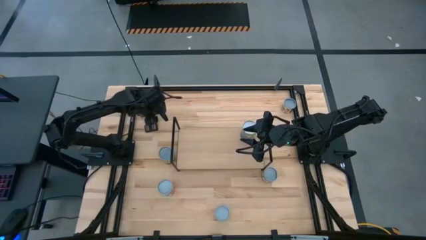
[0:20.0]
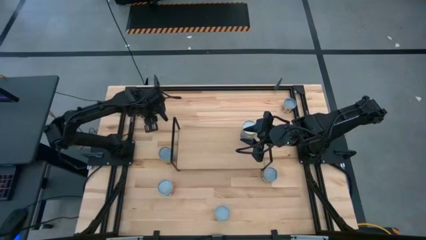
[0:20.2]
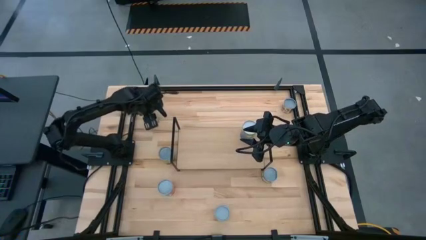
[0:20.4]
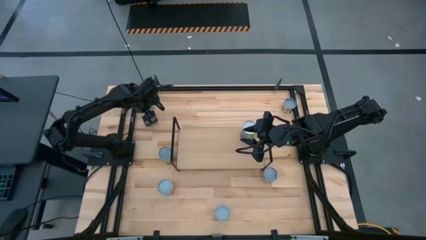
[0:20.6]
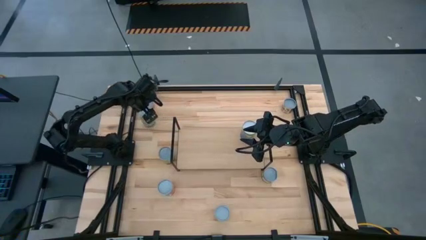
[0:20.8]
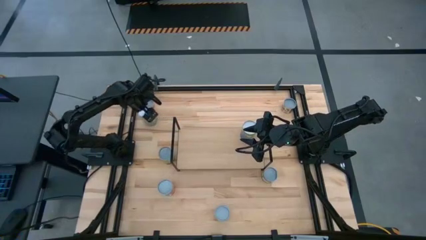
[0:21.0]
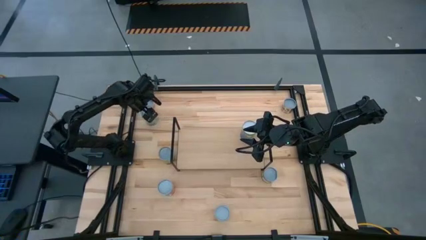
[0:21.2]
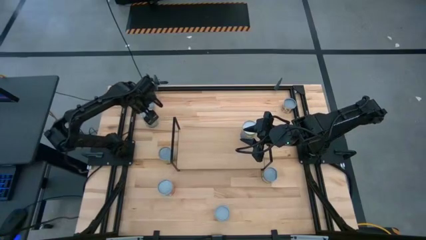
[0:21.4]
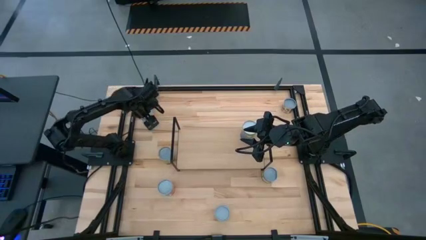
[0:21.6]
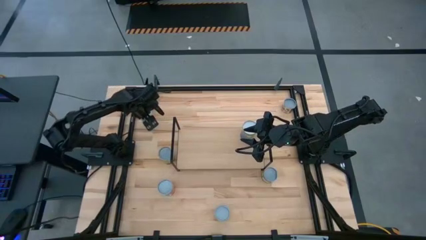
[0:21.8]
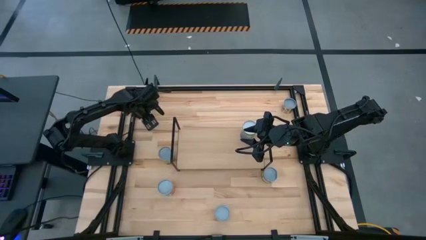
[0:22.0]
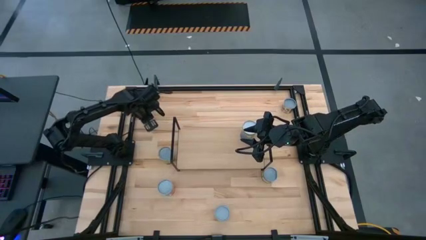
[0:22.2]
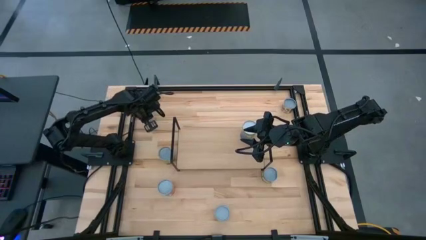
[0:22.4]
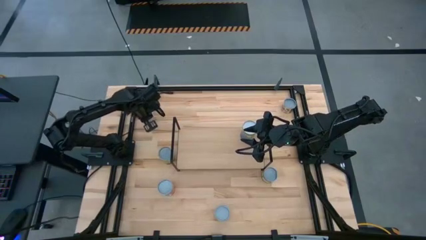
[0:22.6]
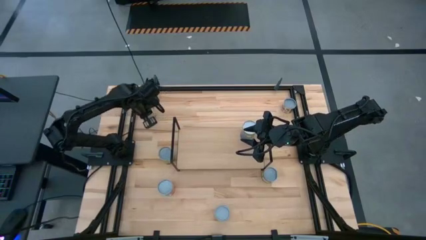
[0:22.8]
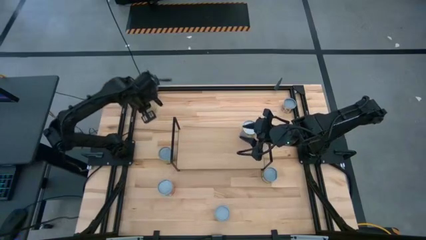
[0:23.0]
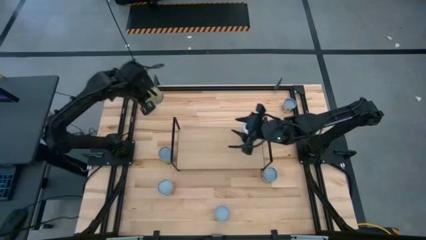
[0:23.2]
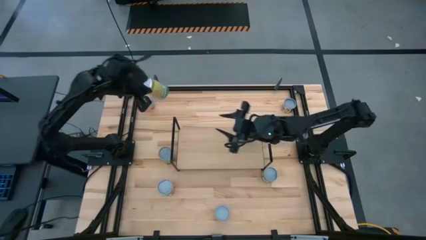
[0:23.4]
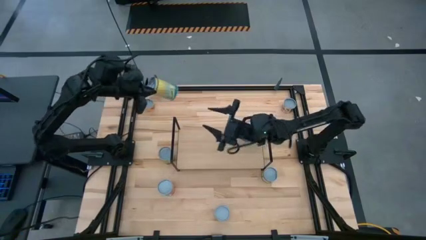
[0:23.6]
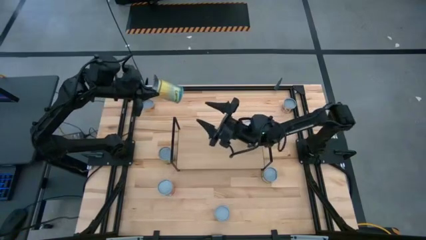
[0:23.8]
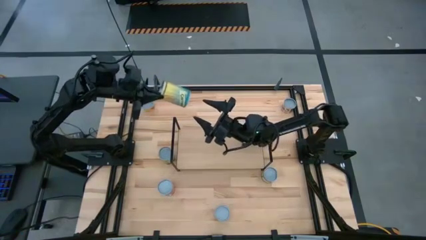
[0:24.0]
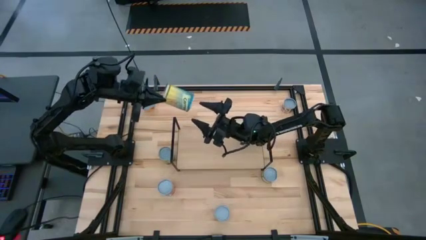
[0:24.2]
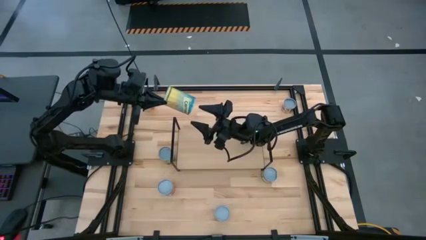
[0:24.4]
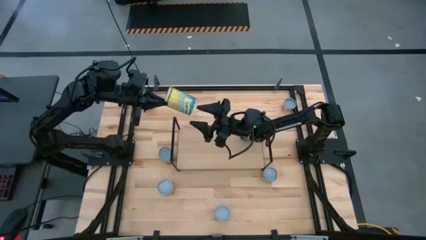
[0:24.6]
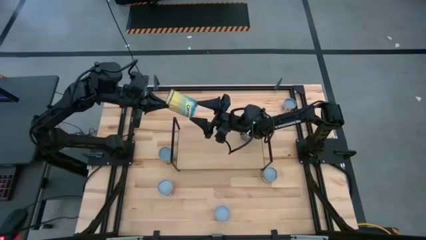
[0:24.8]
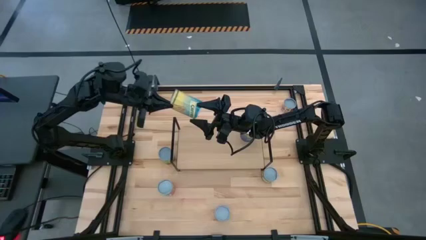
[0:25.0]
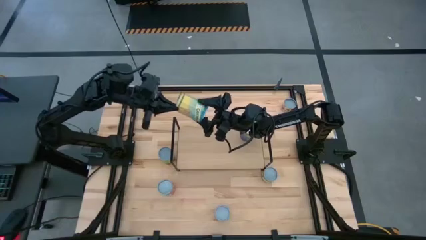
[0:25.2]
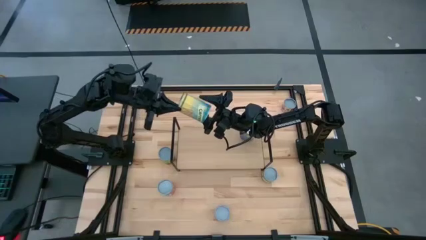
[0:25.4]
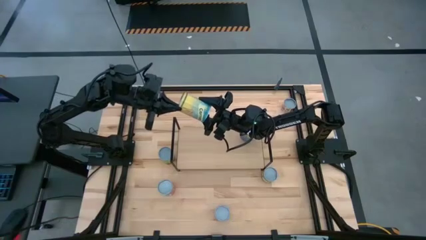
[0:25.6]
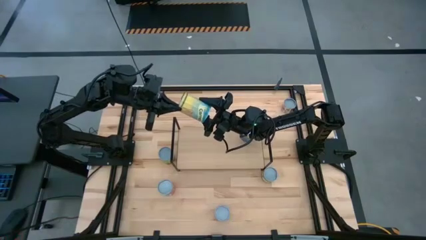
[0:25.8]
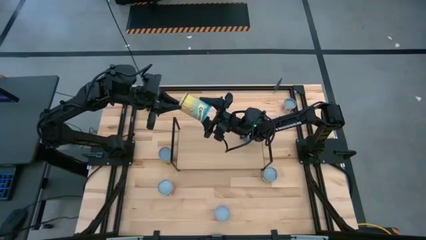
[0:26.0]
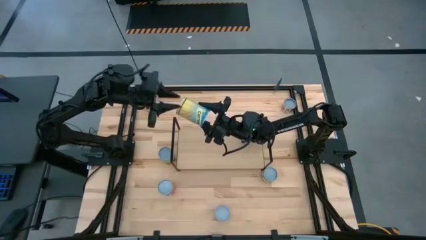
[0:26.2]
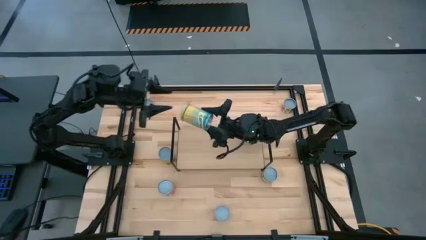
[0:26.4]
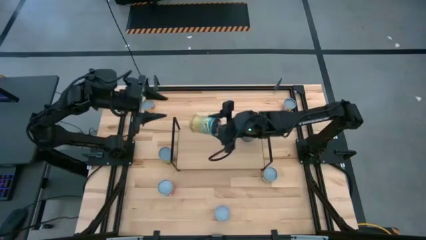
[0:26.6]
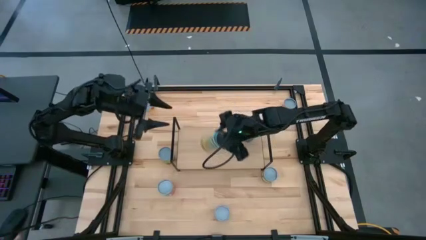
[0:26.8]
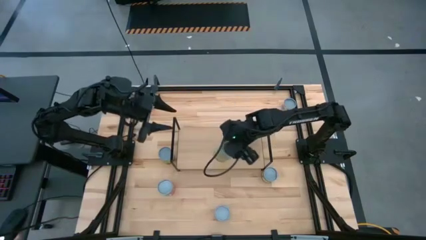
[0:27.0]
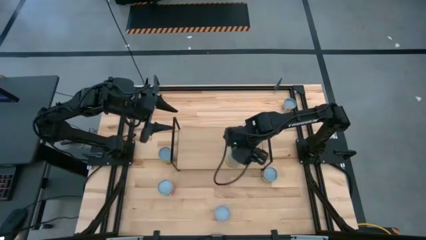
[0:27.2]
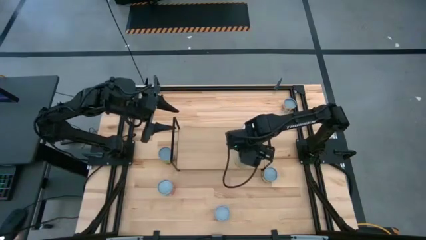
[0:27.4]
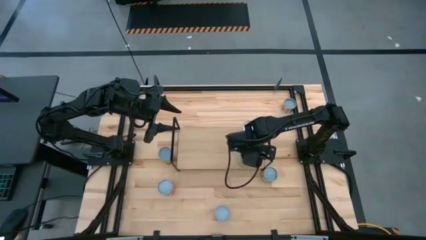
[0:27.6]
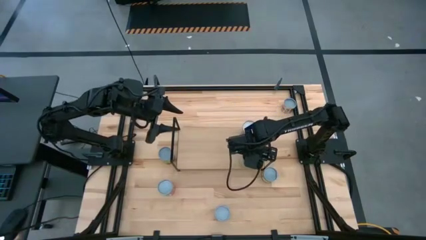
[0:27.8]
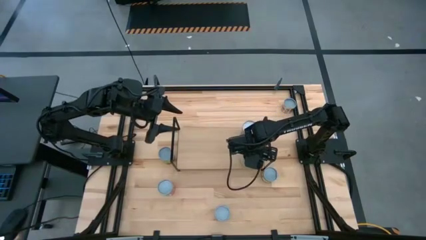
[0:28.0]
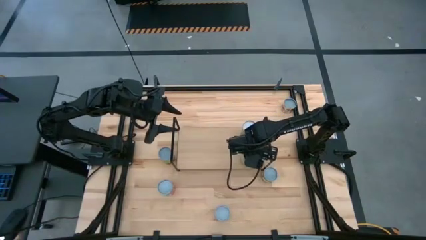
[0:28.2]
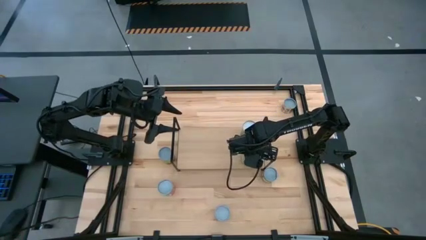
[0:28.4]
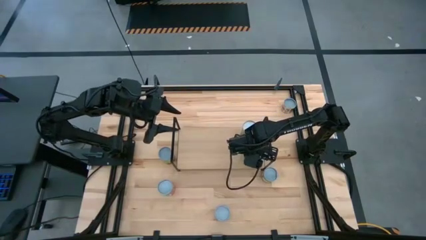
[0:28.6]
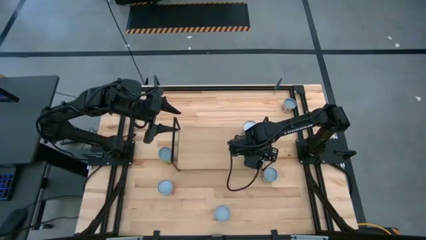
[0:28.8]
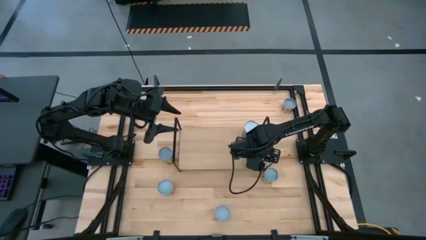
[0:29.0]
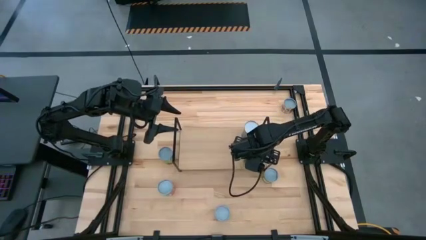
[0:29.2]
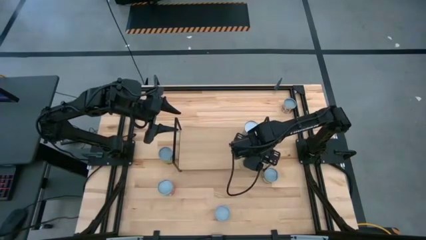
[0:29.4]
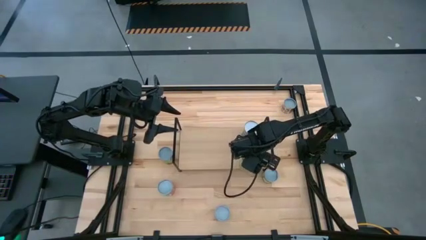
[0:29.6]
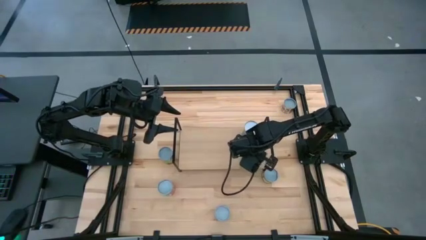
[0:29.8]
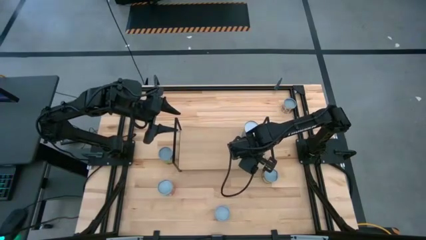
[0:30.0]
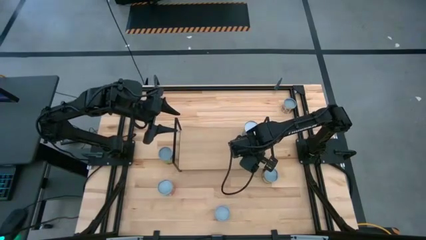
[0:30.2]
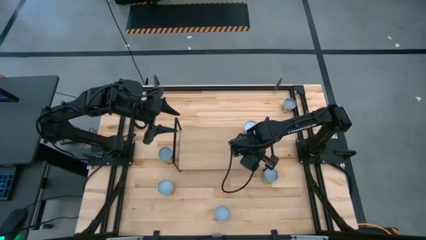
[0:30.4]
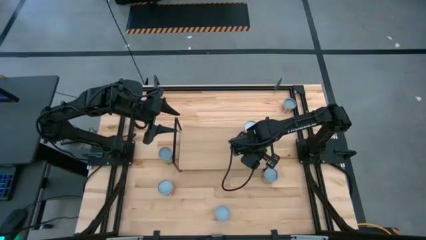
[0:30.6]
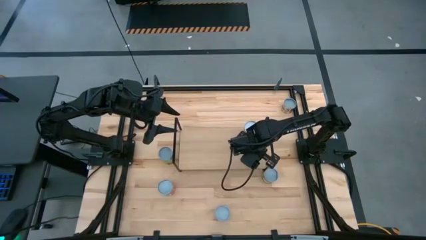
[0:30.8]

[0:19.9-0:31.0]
Task: Pick and place cans onto a shelf
Put the canned carrots on the shelf

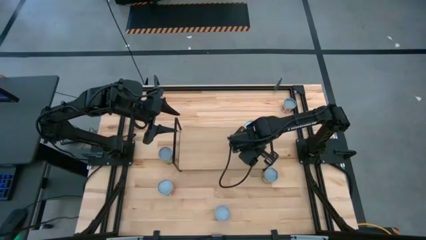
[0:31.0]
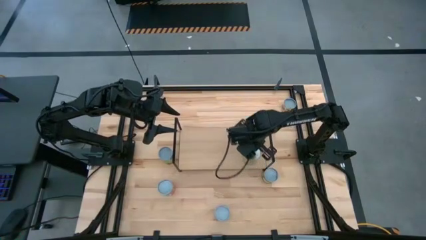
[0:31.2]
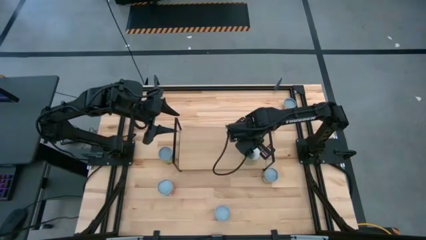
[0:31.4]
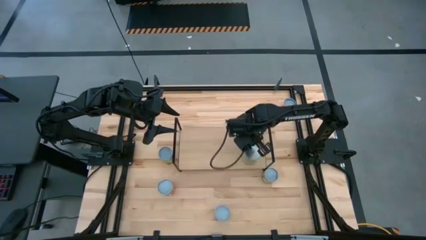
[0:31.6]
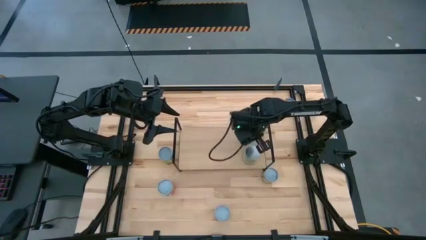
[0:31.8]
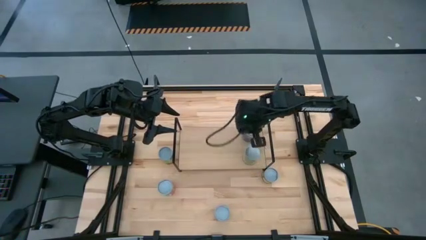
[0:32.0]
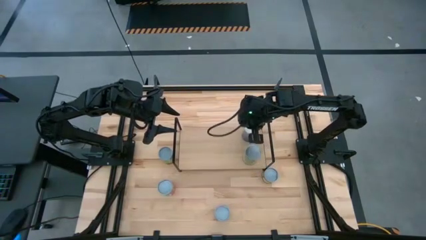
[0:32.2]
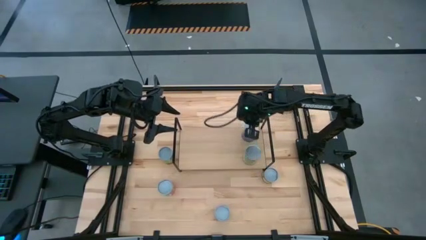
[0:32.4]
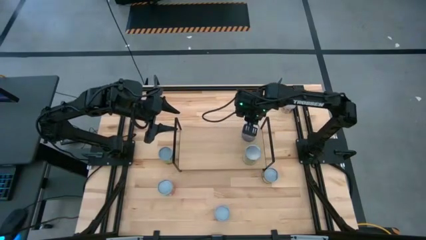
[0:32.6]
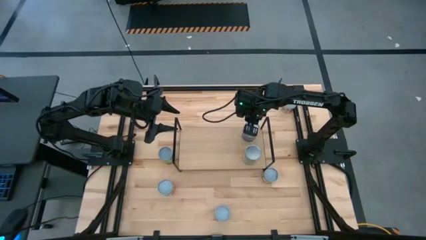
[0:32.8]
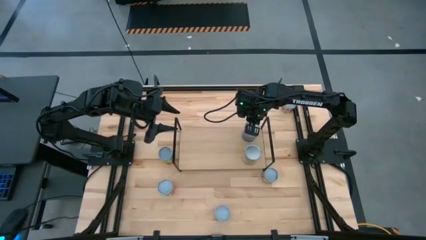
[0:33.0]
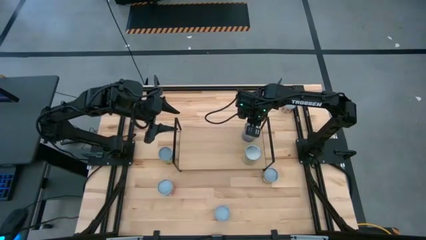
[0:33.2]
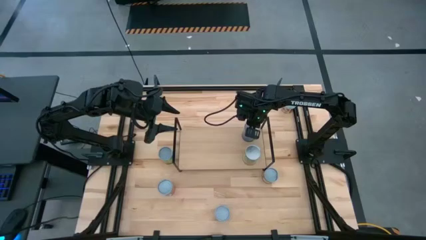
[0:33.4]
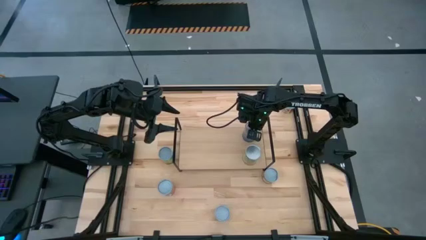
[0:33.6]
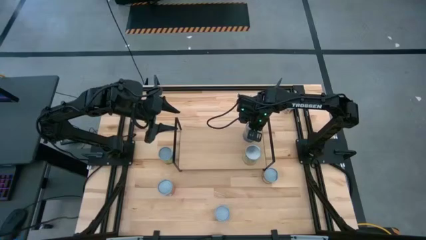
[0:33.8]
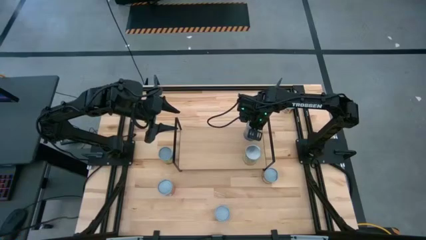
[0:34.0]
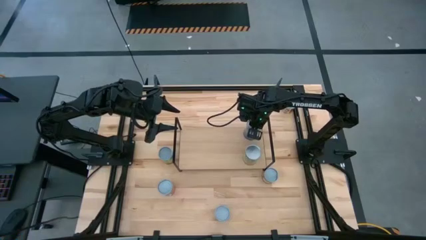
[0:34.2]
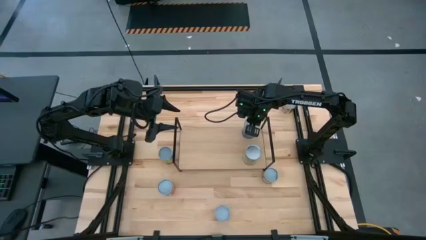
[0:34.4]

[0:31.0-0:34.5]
Adjust the canned peas on the shelf
